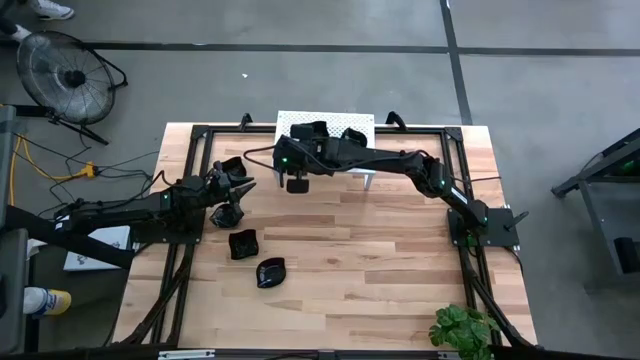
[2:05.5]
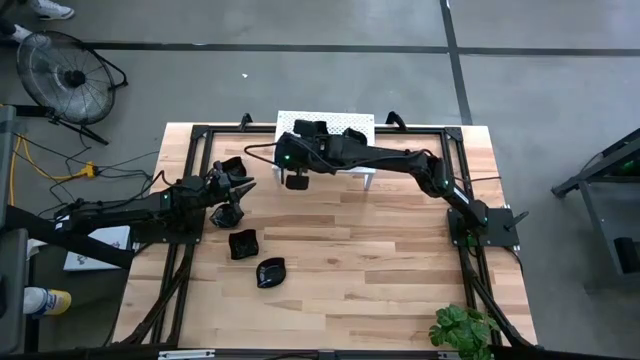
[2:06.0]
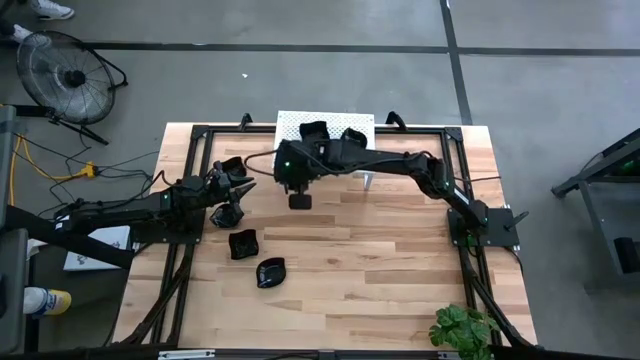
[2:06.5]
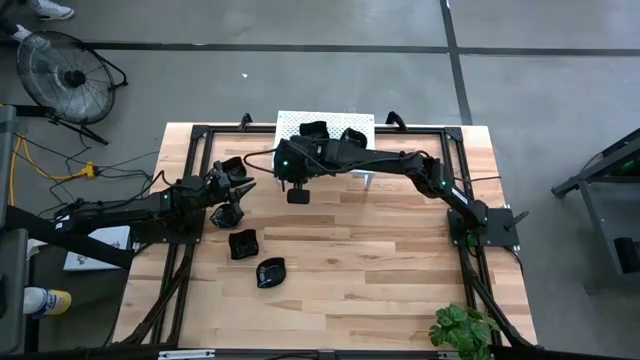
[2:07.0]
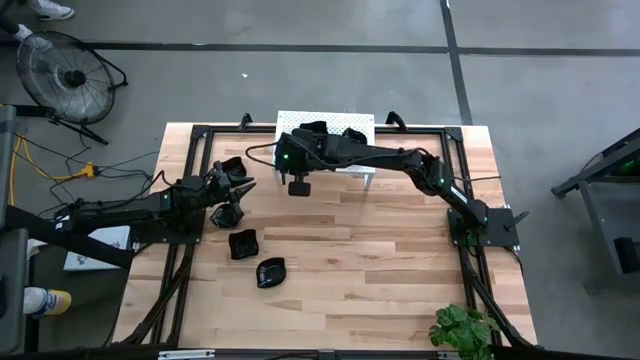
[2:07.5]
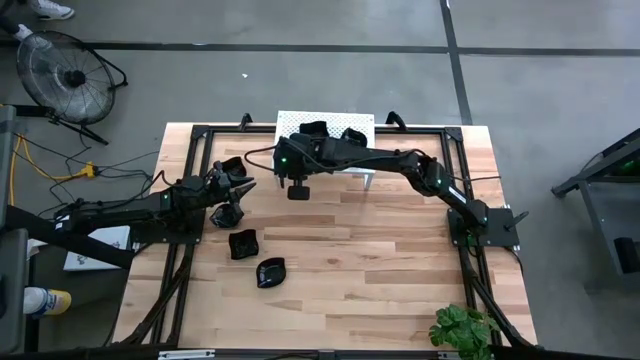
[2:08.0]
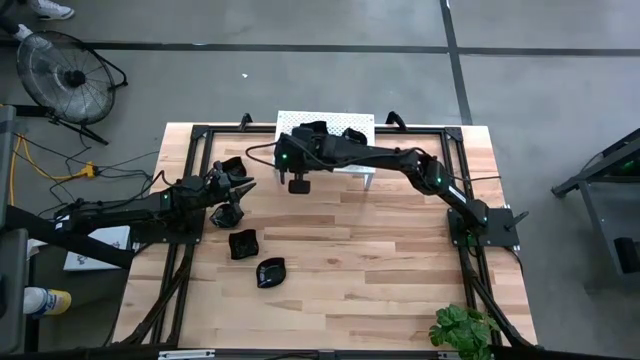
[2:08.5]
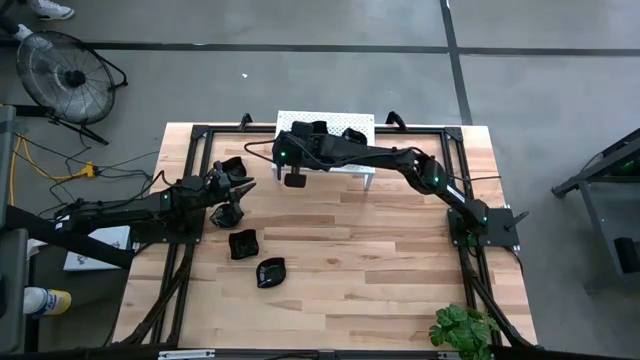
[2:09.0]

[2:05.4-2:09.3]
Task: Pick & Place Mini shaped plates
Adjust the stacked square plates on the shelf

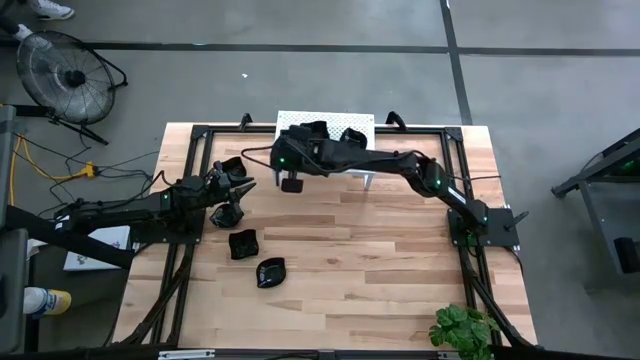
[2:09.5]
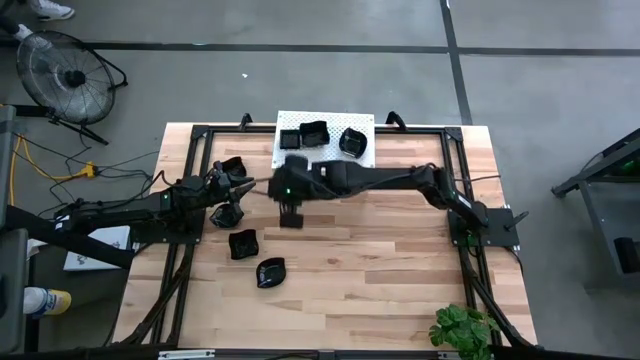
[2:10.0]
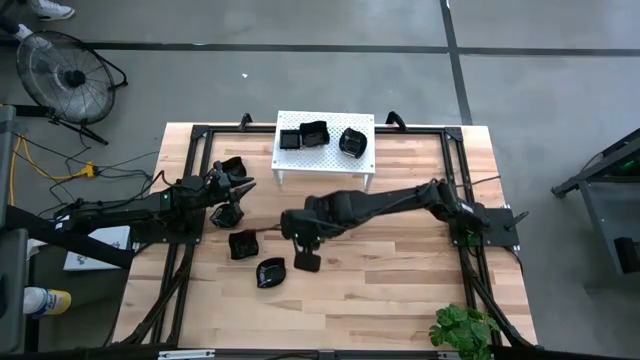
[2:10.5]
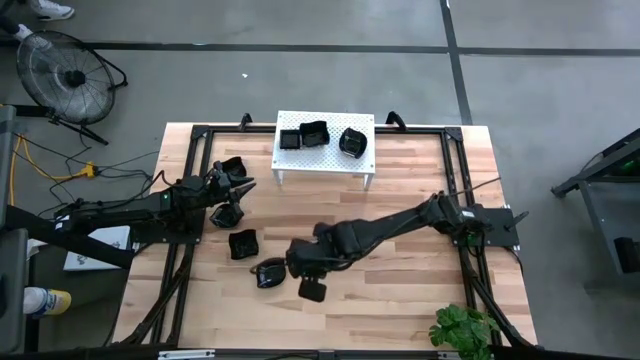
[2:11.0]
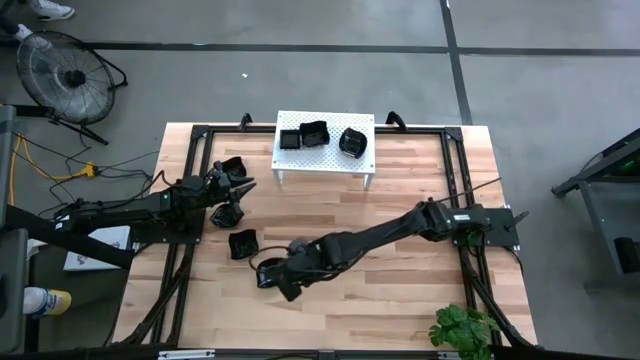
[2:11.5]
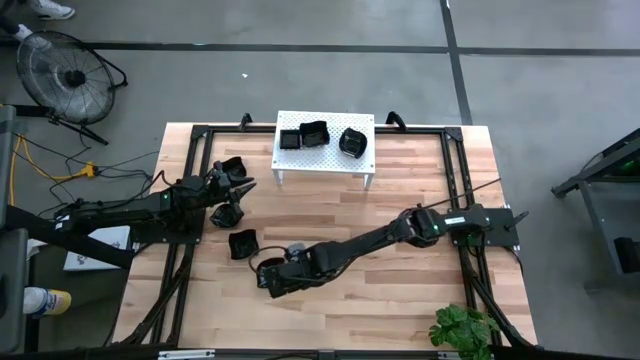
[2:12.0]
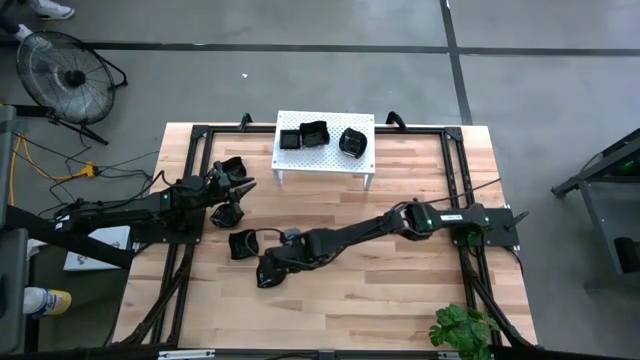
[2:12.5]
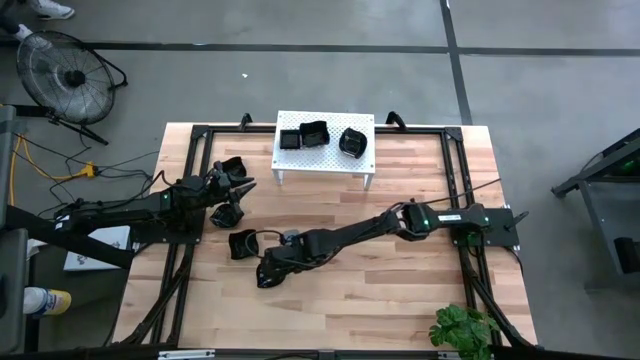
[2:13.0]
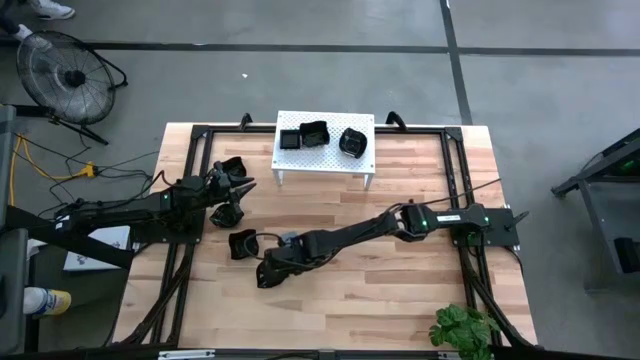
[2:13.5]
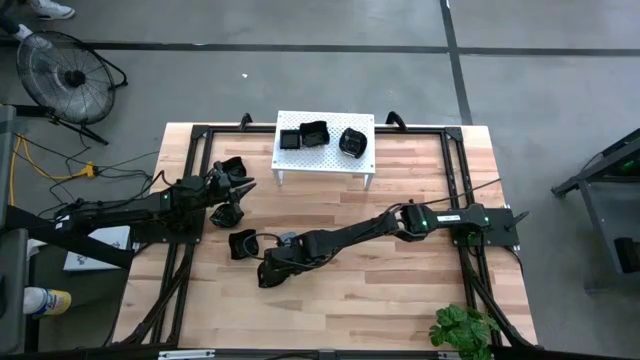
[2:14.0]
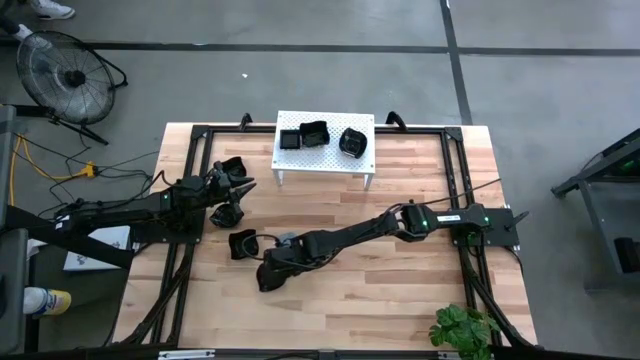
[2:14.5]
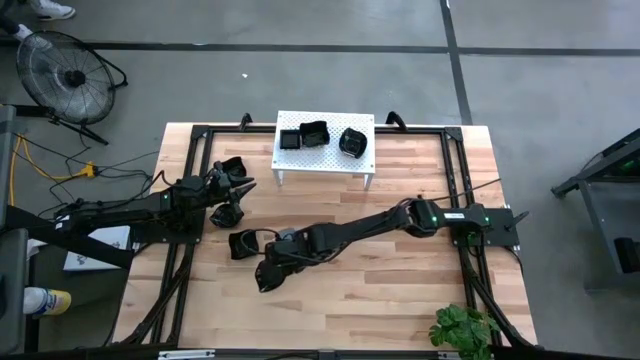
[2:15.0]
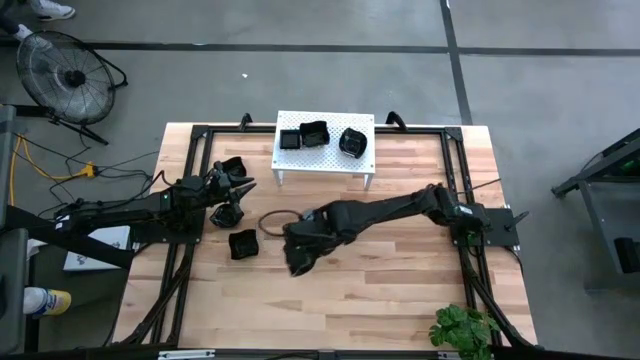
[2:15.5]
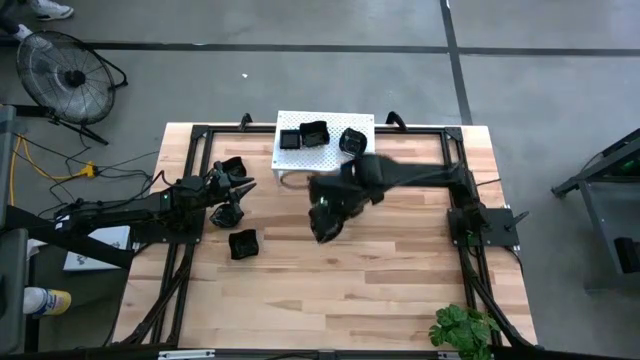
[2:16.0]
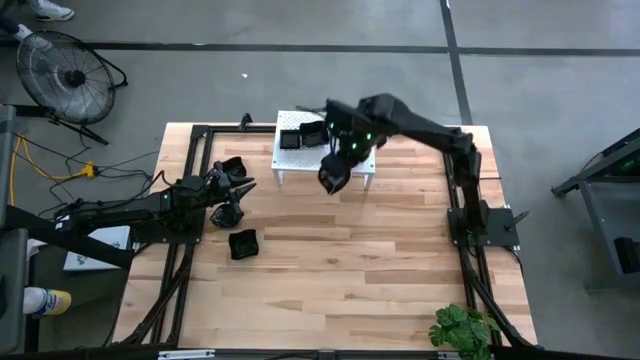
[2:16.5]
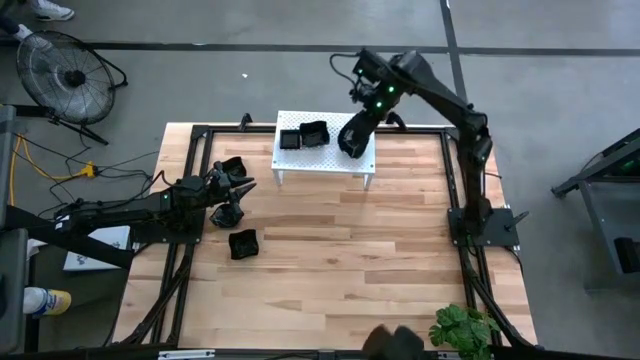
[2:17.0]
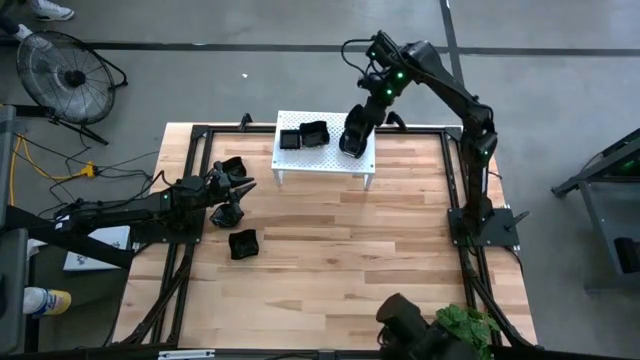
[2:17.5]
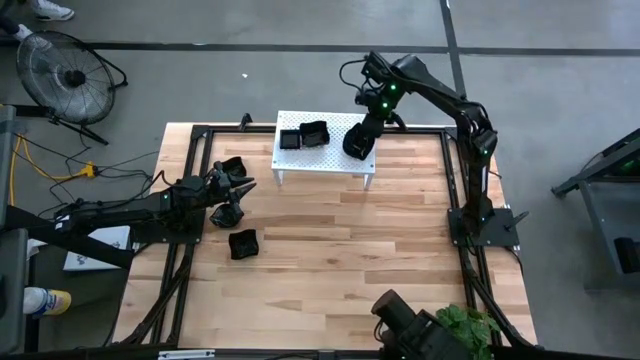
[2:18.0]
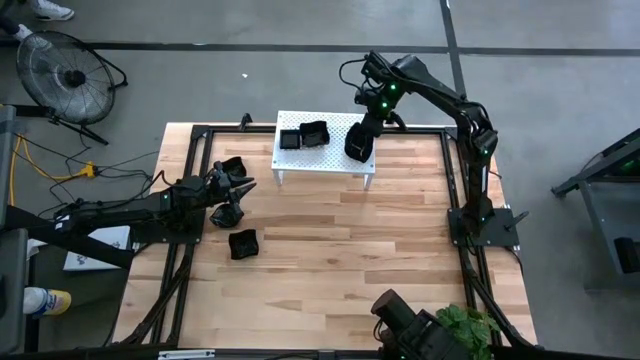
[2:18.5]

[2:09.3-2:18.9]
Stack the leaf shaped plate on top of the other leaf shaped plate on the shelf

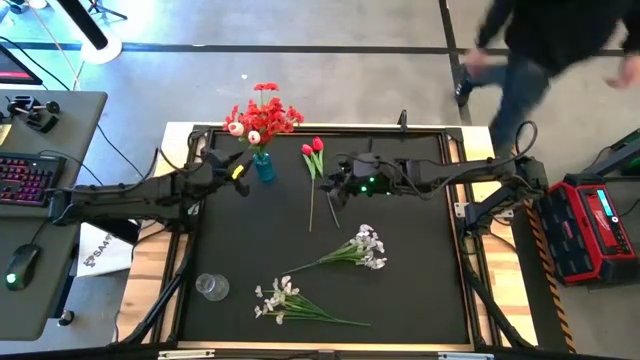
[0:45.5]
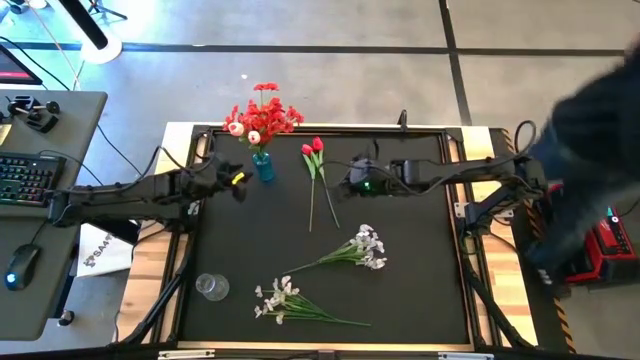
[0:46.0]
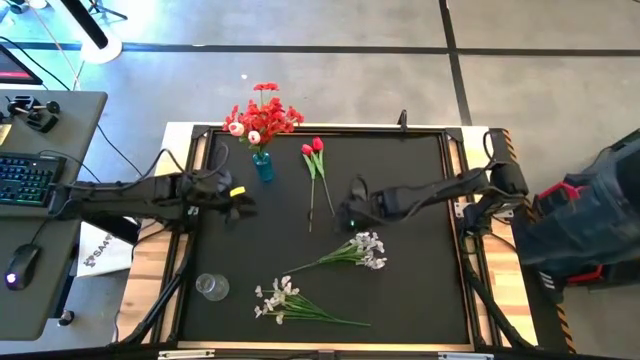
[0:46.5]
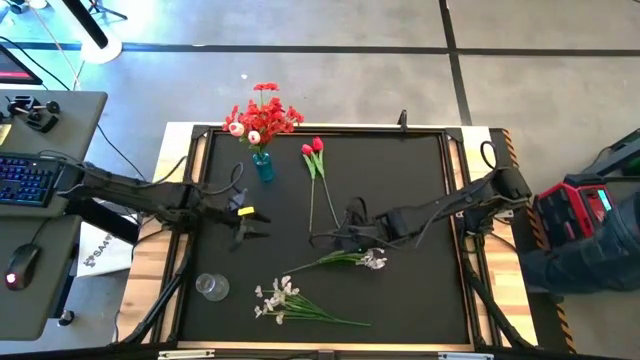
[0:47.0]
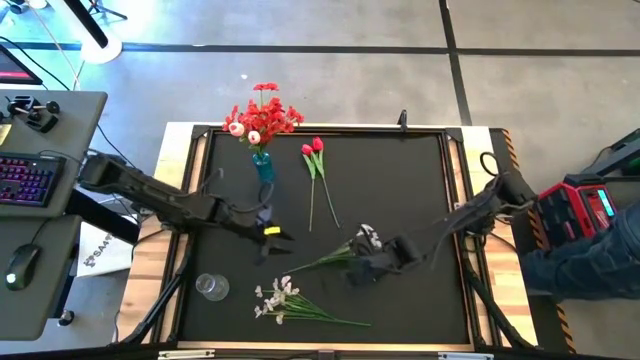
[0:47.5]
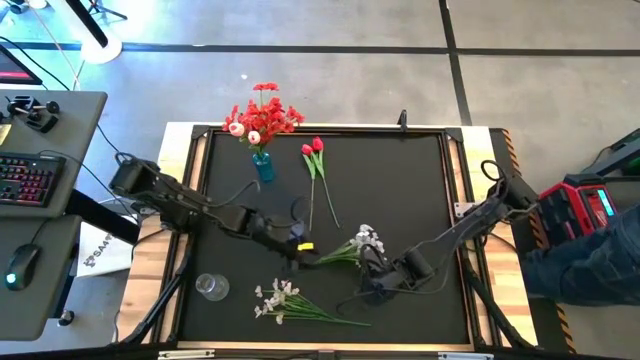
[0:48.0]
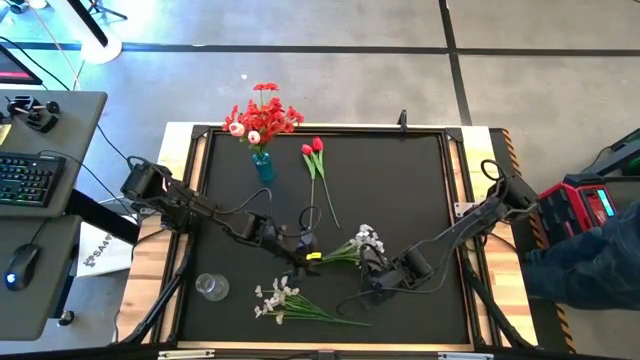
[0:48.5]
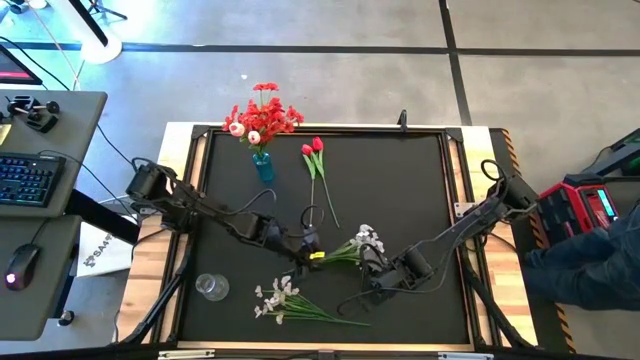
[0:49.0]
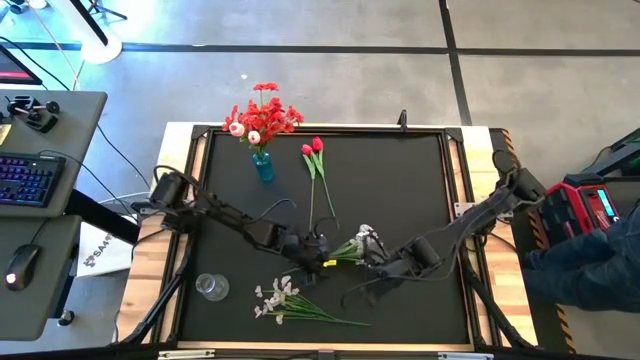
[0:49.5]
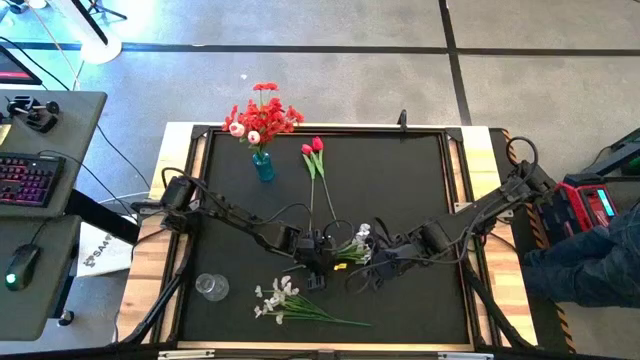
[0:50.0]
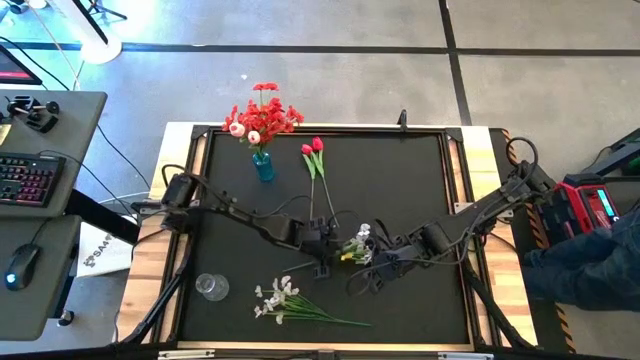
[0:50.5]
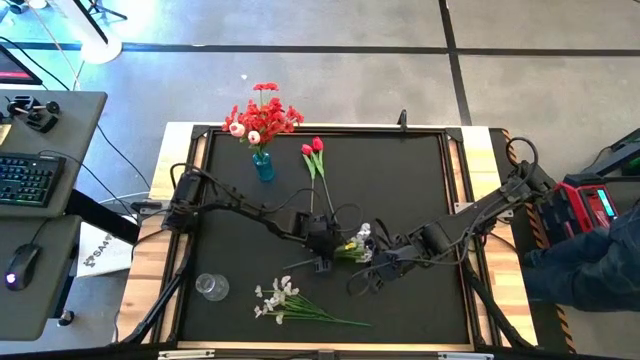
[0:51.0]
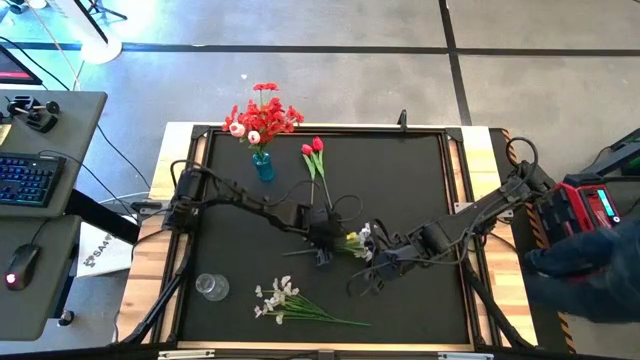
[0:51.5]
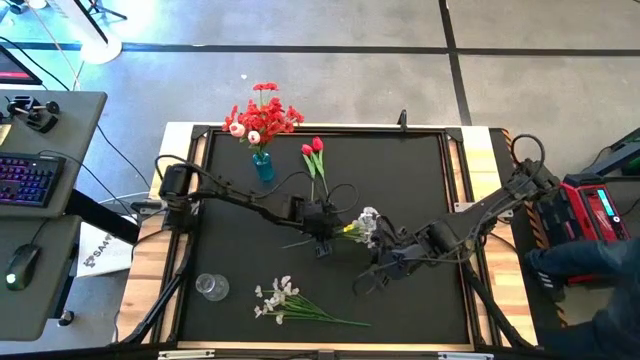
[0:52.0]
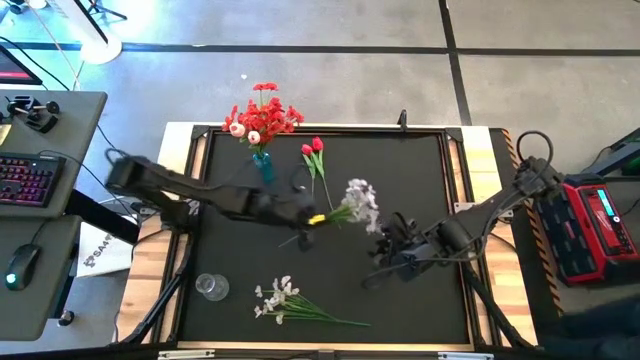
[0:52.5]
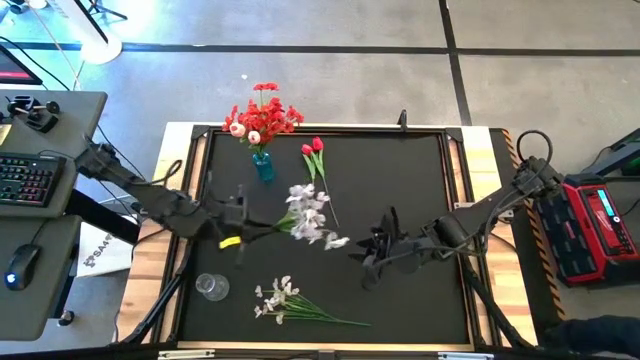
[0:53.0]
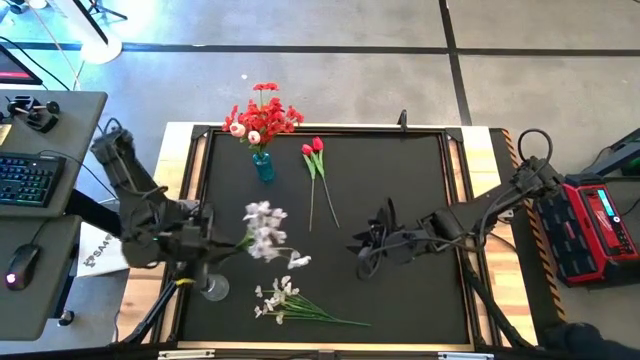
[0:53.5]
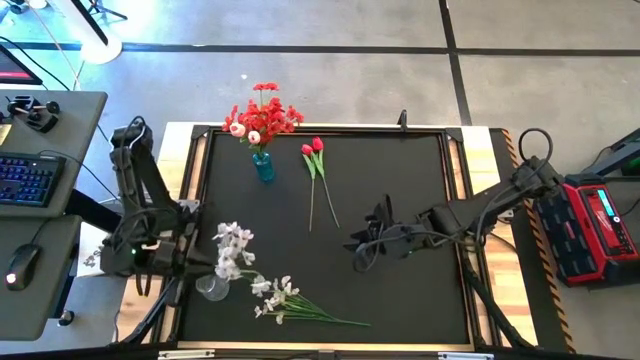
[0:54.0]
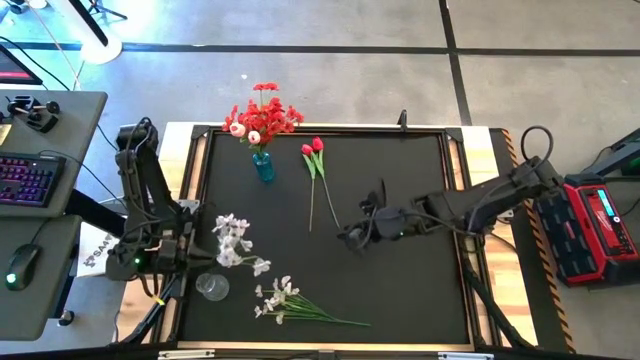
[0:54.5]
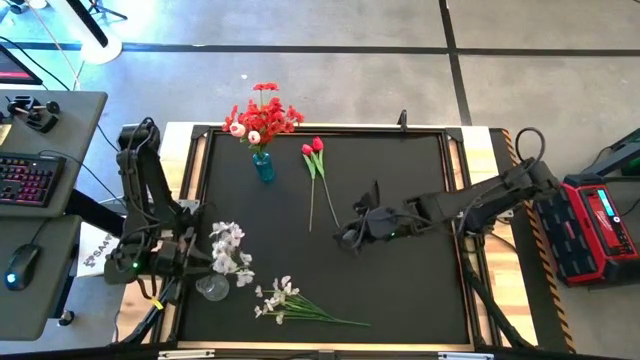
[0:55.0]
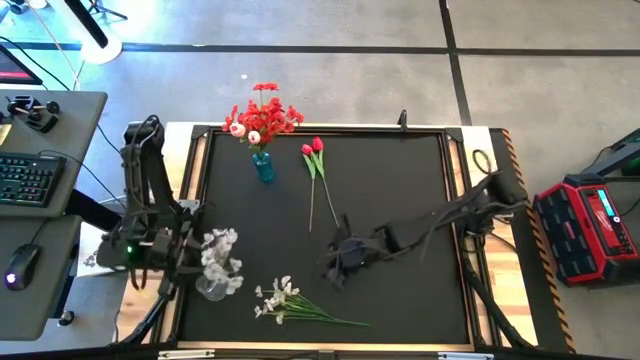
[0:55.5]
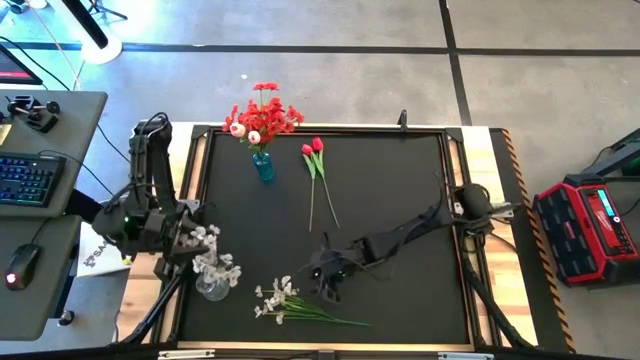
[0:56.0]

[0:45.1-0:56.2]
Task: Sort flowers into vase by color
Put the center white flower into the transparent vase
